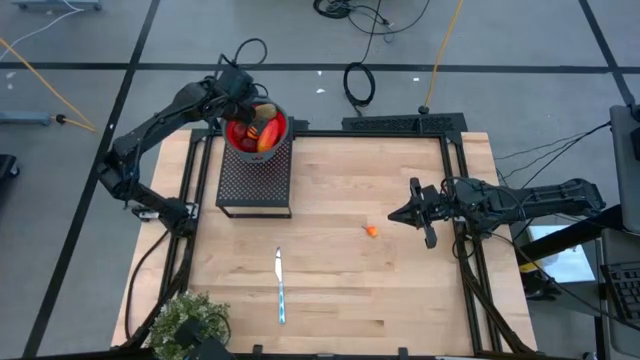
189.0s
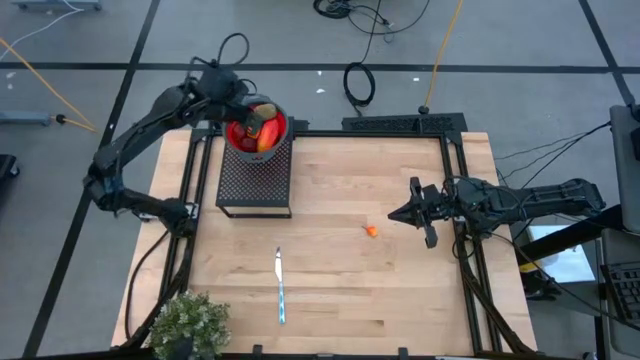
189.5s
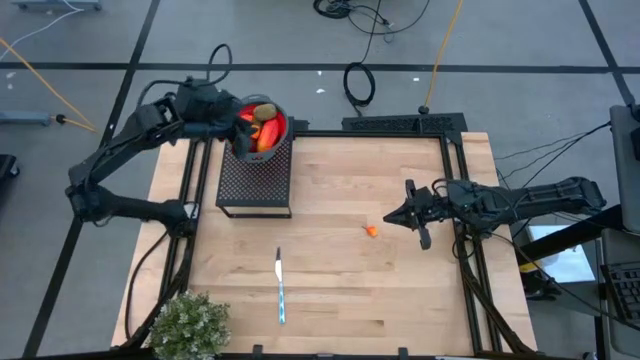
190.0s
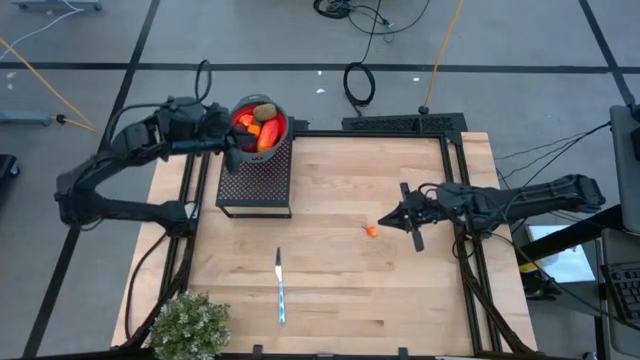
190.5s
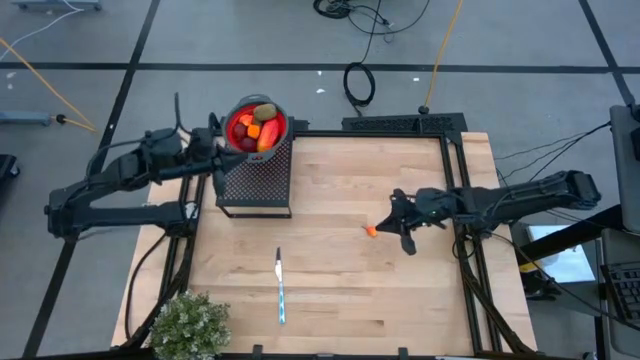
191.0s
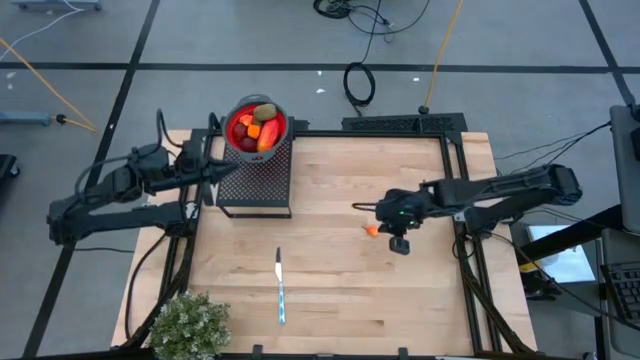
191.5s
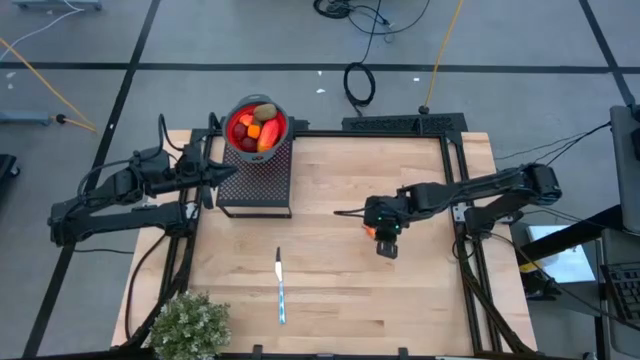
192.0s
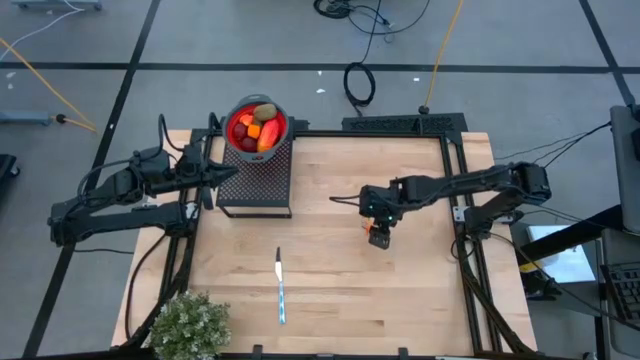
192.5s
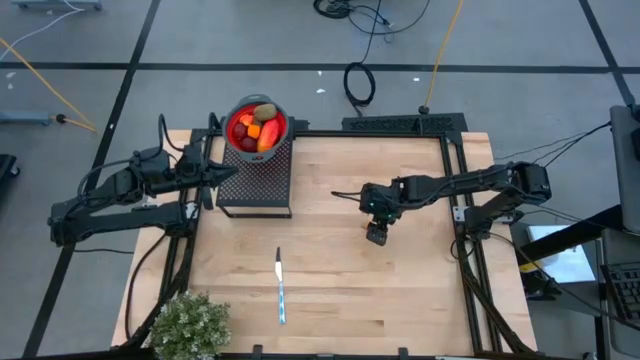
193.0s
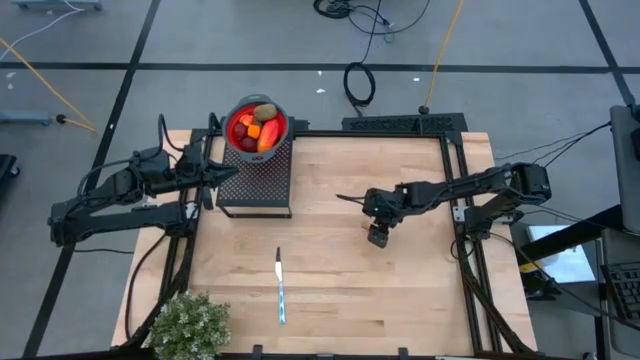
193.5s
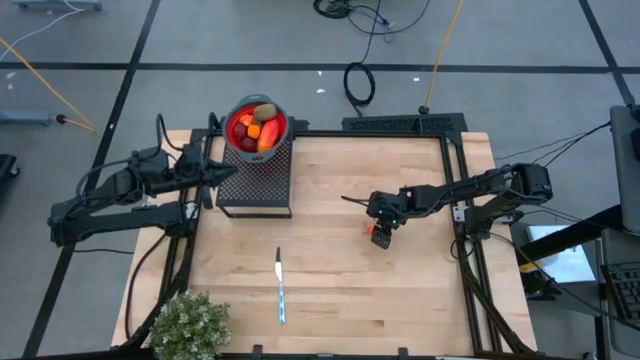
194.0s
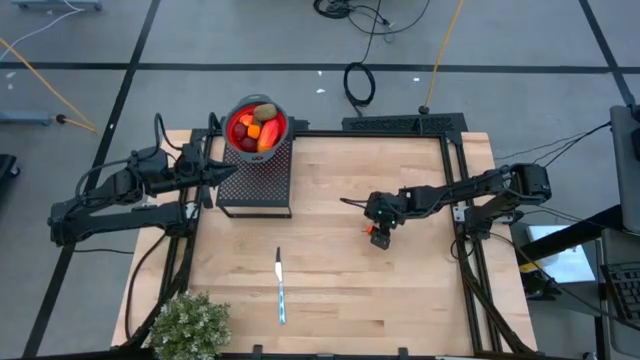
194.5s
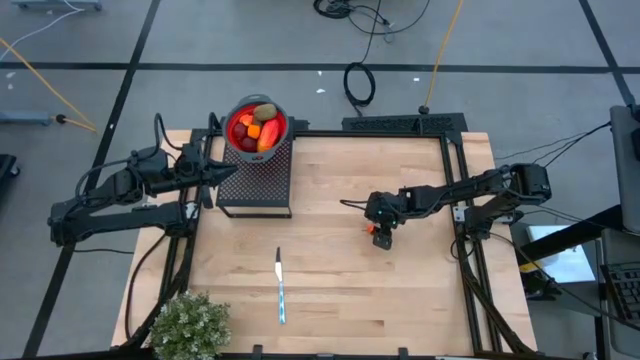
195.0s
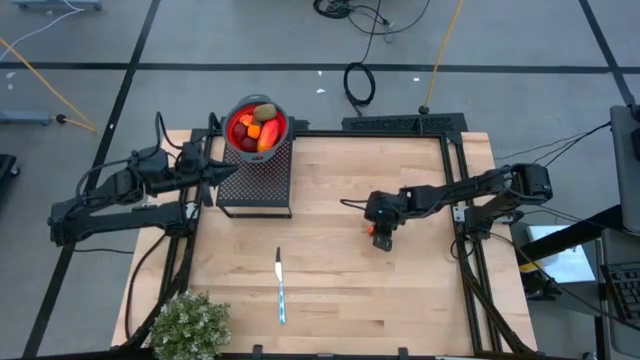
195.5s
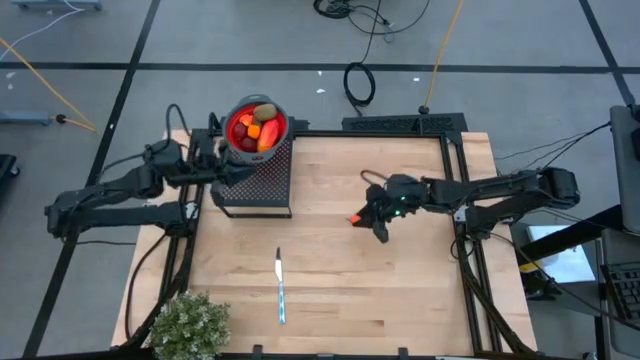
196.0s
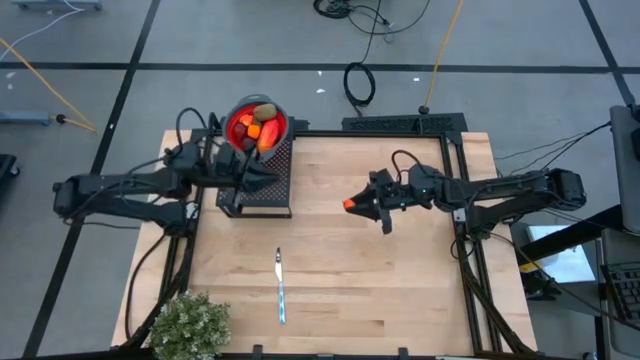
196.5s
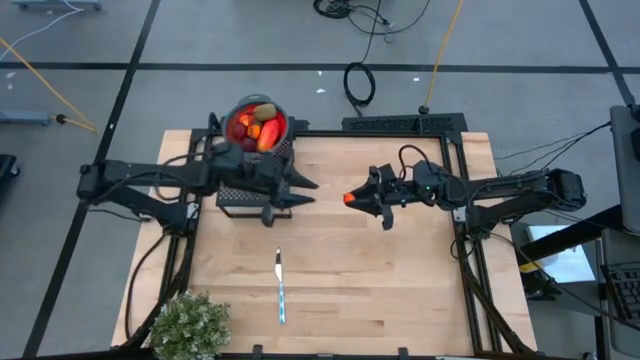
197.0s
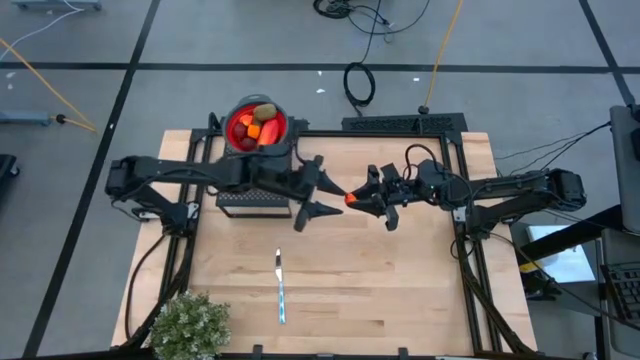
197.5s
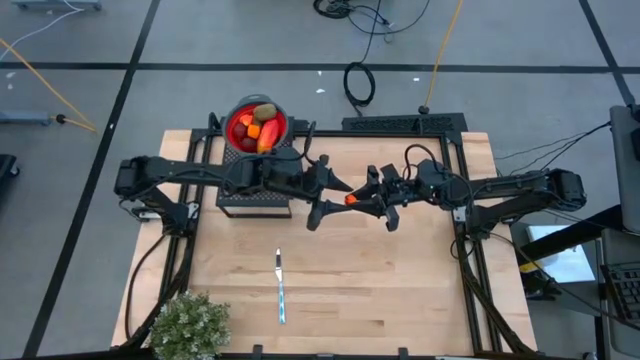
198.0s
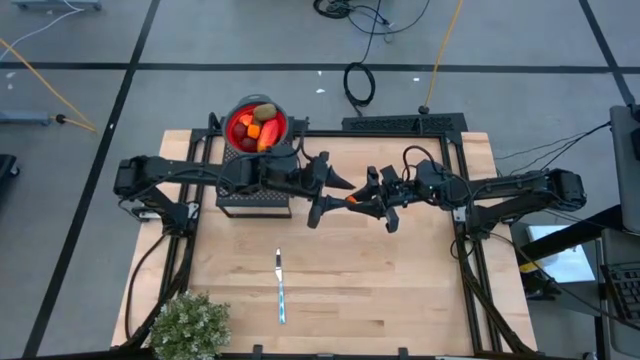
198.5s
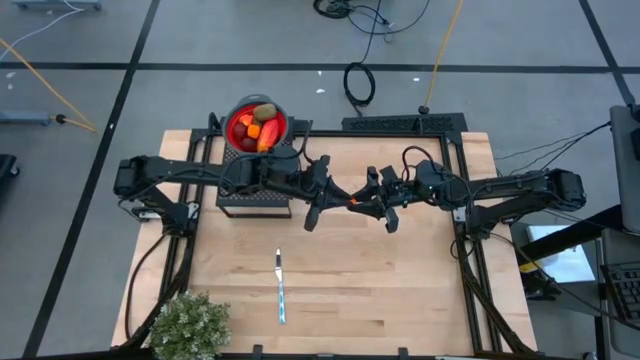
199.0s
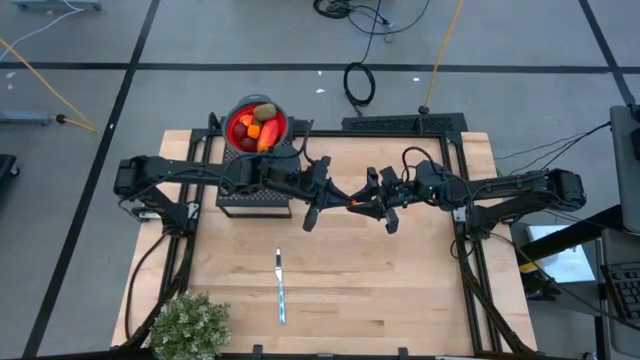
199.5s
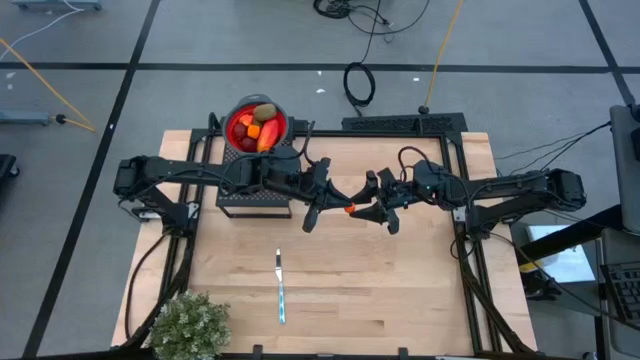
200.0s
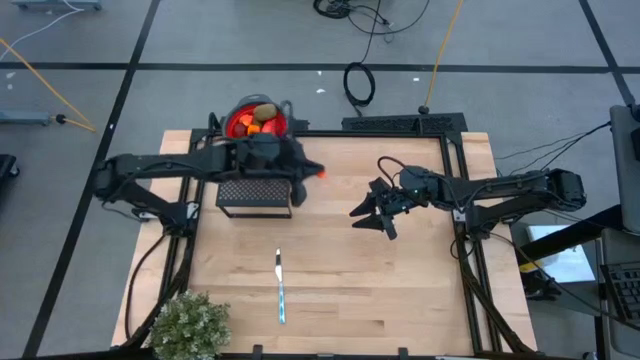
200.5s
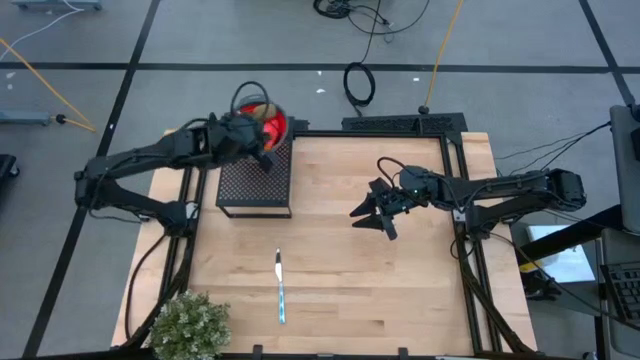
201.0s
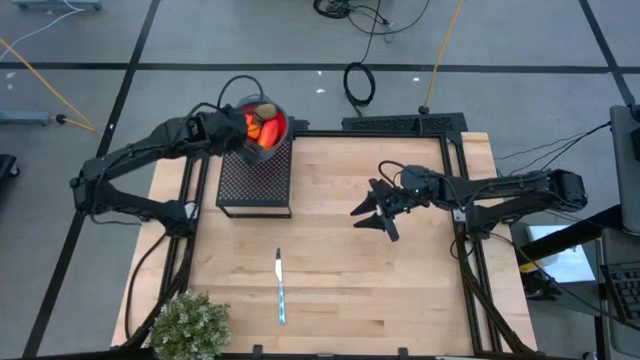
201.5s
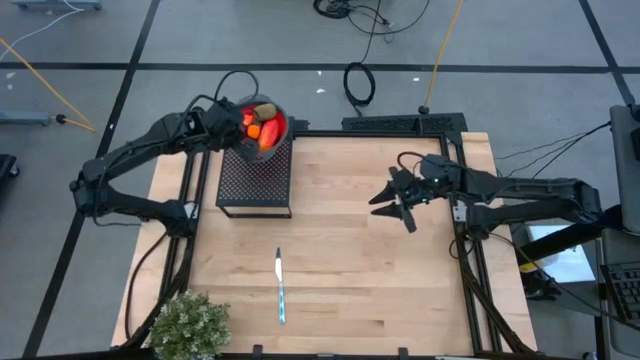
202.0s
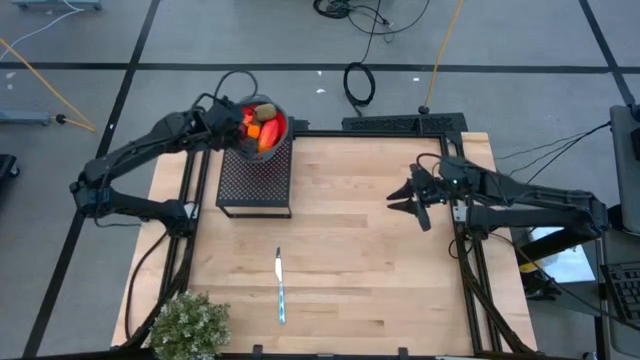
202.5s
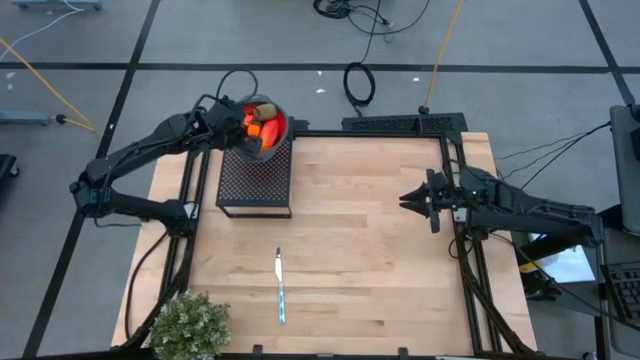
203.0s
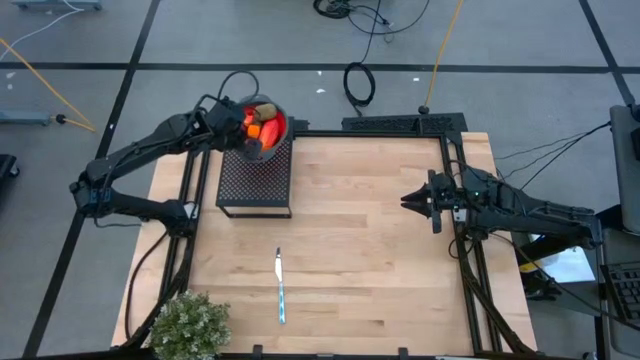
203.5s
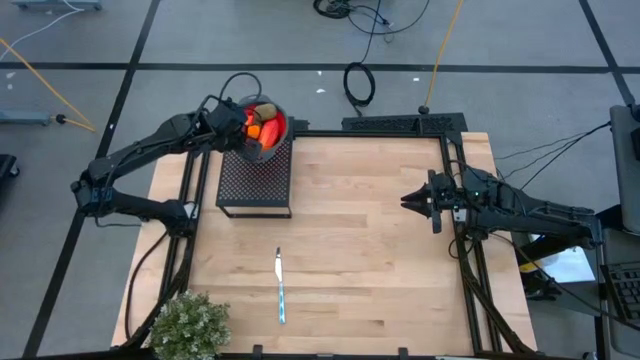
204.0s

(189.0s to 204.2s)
Task: Pick & Place Fruit
Put the peach into the red strainer bowl on the shelf

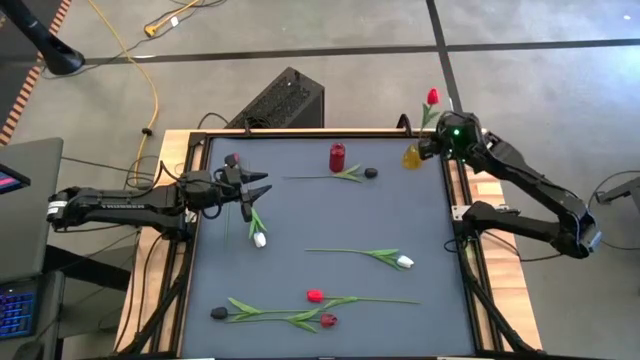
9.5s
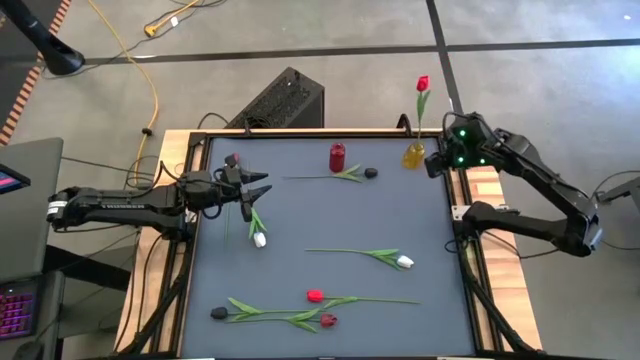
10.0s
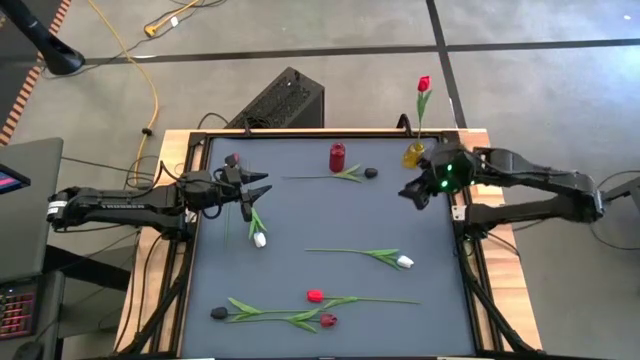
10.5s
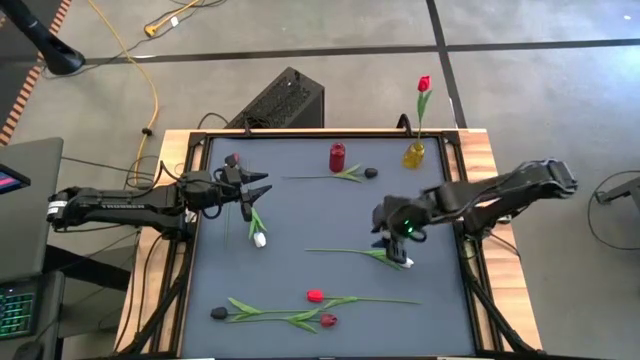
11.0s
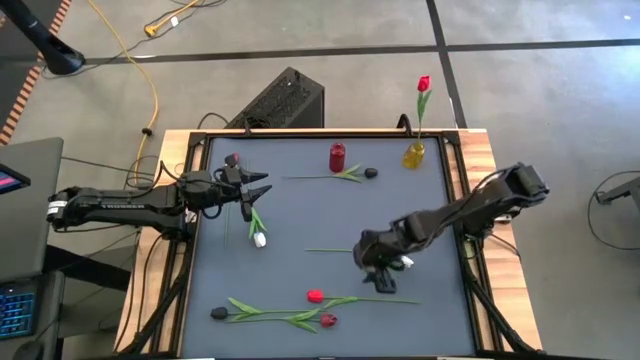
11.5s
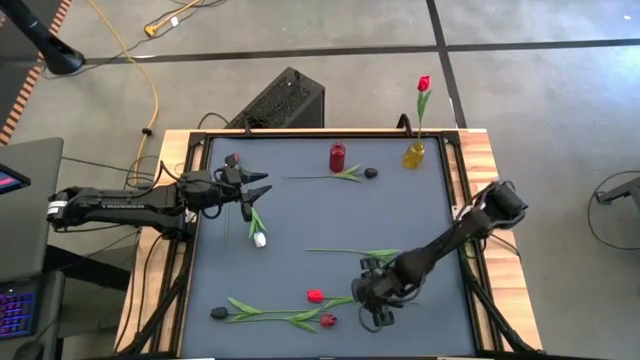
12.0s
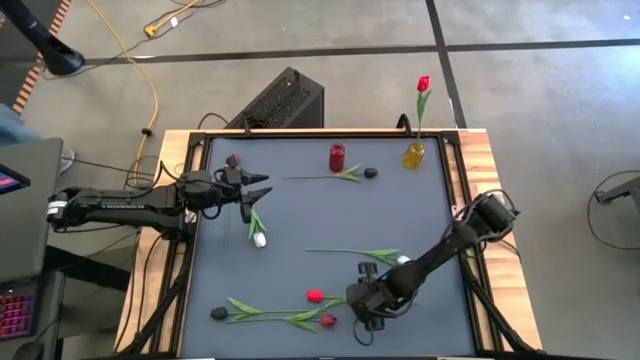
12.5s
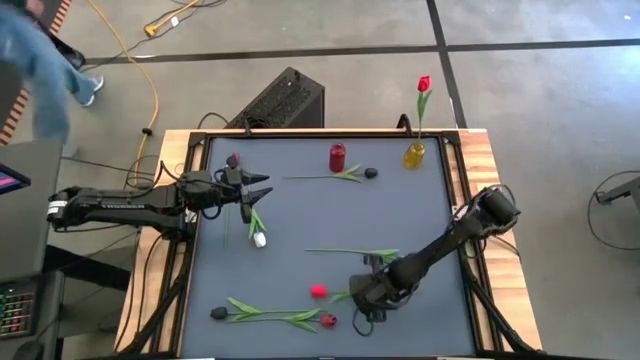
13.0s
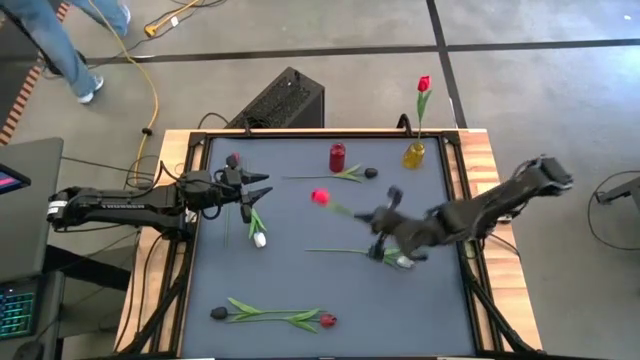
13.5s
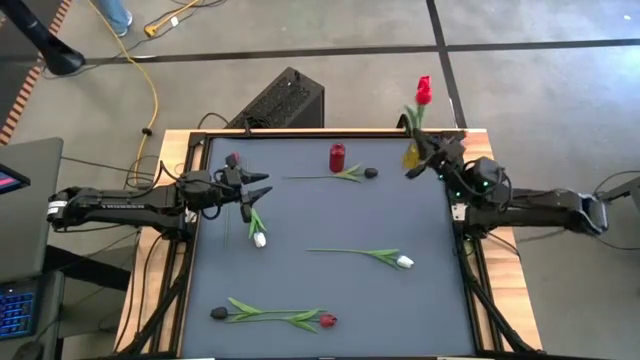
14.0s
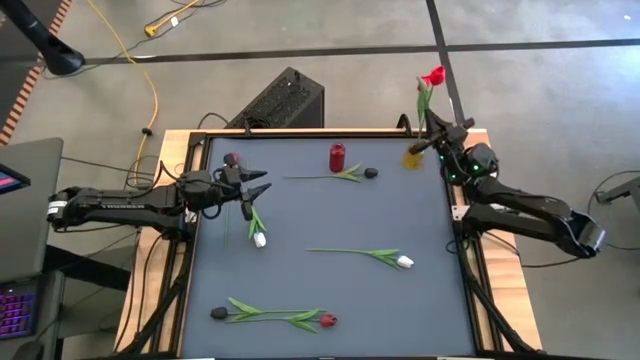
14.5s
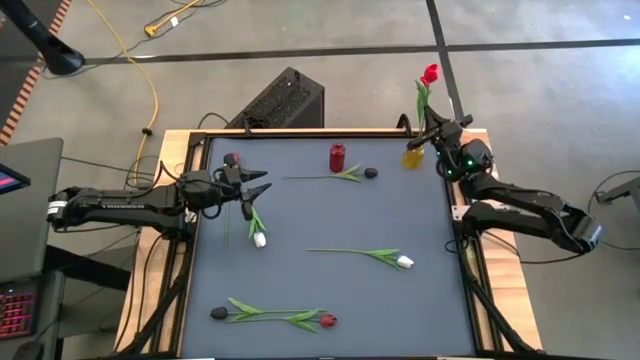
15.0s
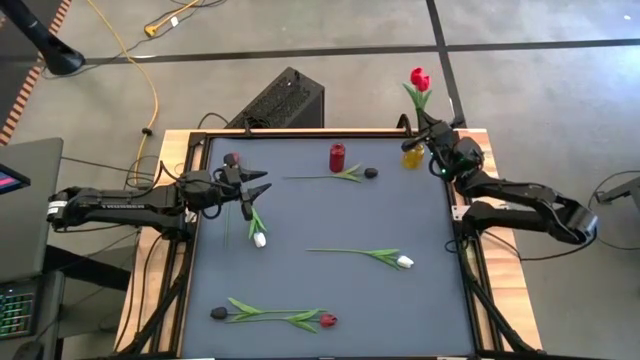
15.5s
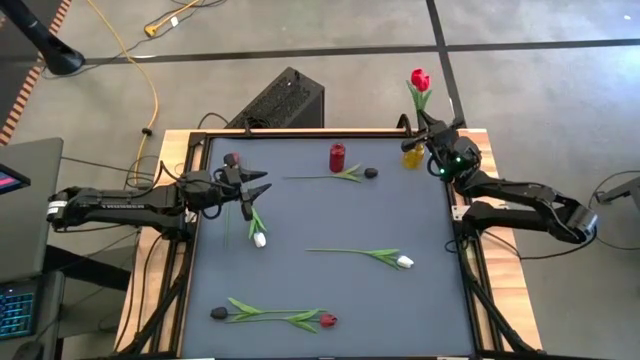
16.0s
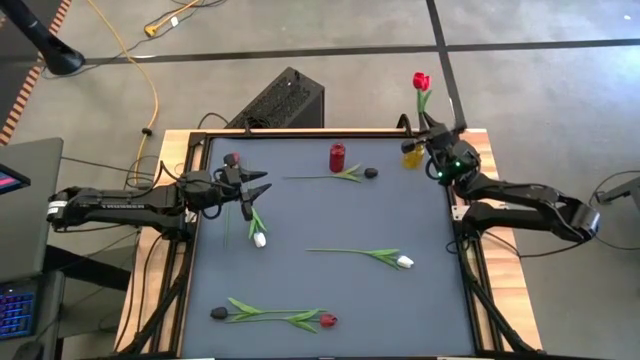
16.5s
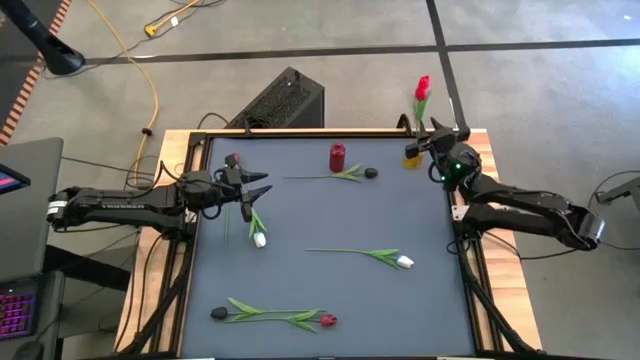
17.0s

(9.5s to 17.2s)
Task: Sort flowers into vase by color
Put the red tulip into the yellow vase
